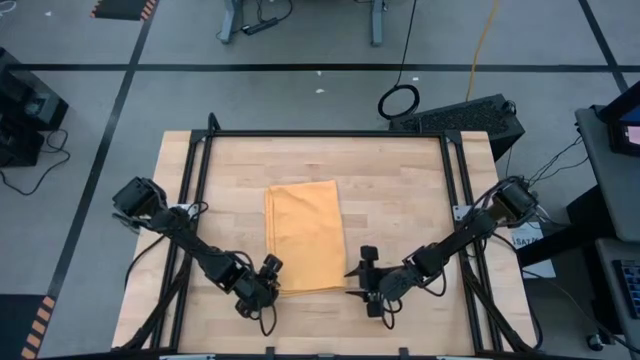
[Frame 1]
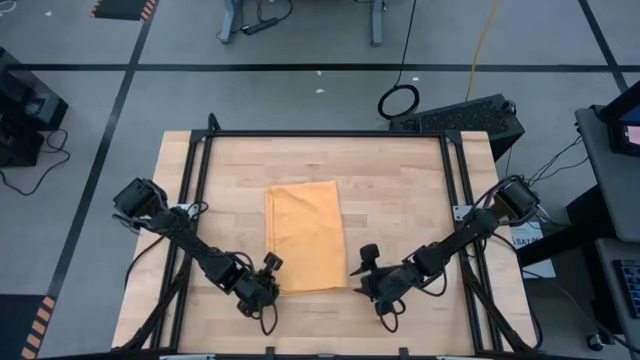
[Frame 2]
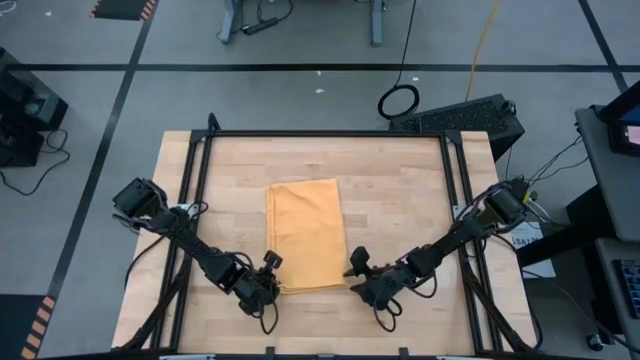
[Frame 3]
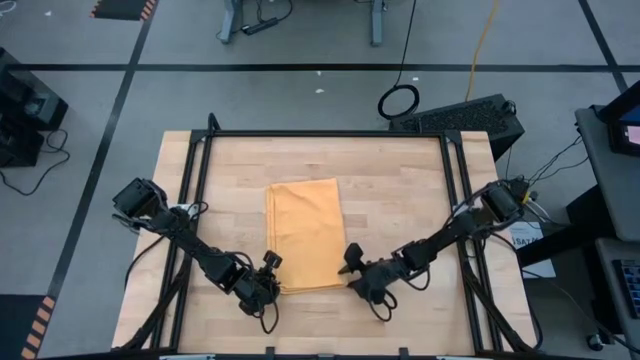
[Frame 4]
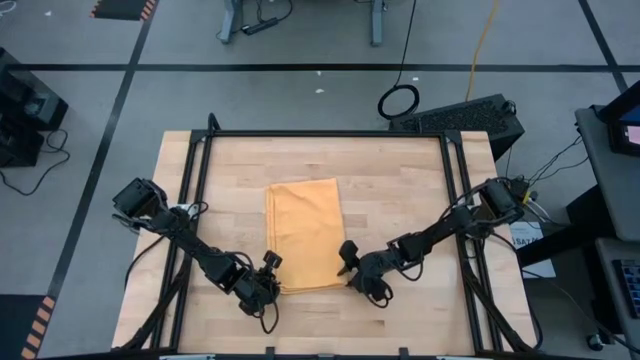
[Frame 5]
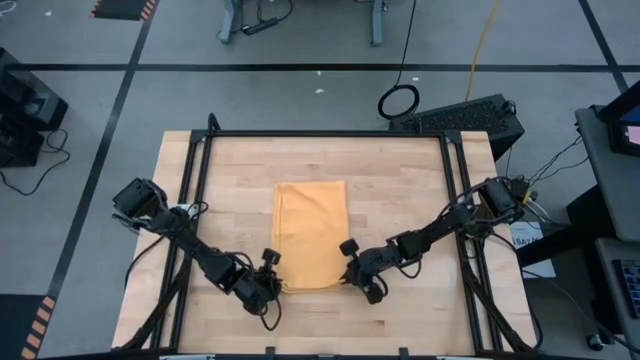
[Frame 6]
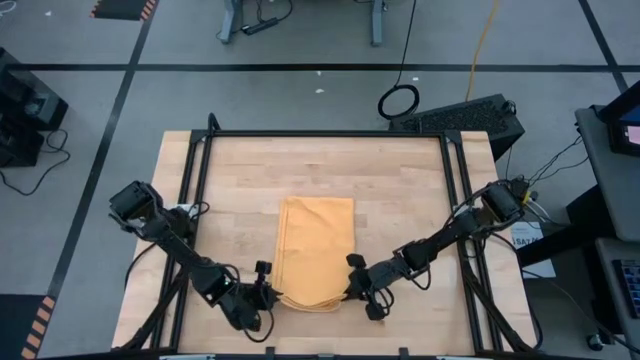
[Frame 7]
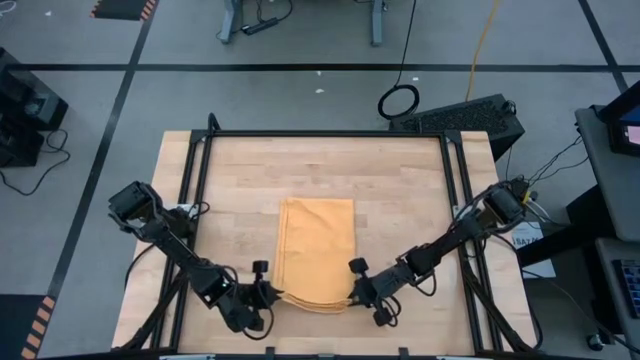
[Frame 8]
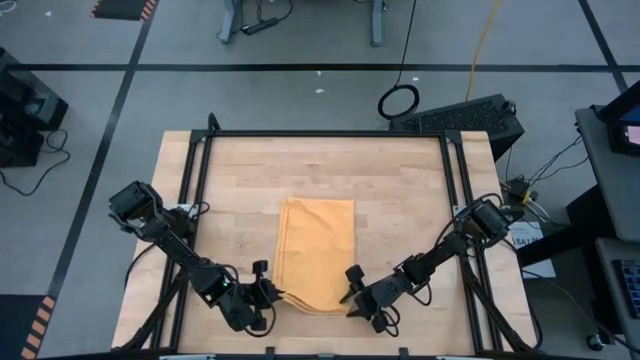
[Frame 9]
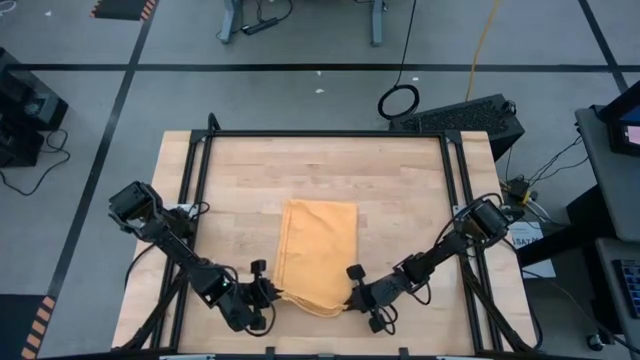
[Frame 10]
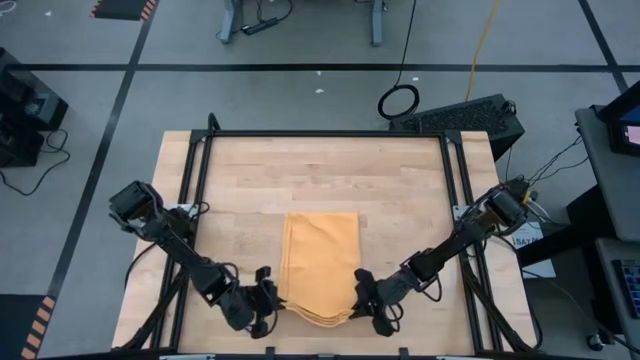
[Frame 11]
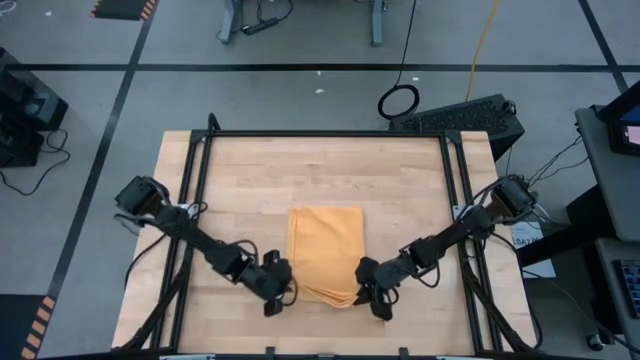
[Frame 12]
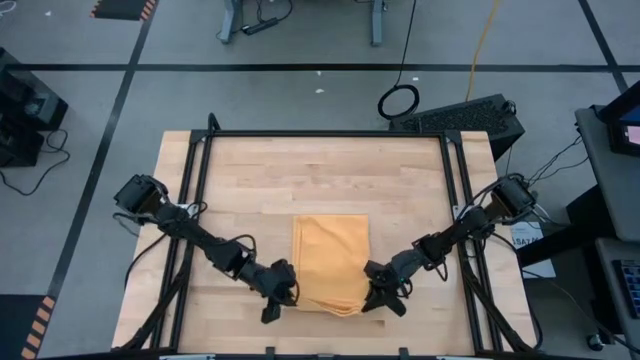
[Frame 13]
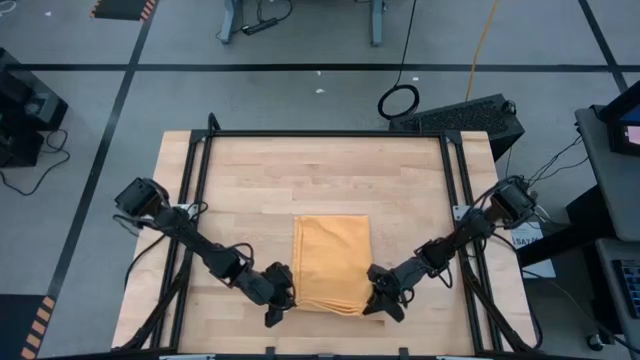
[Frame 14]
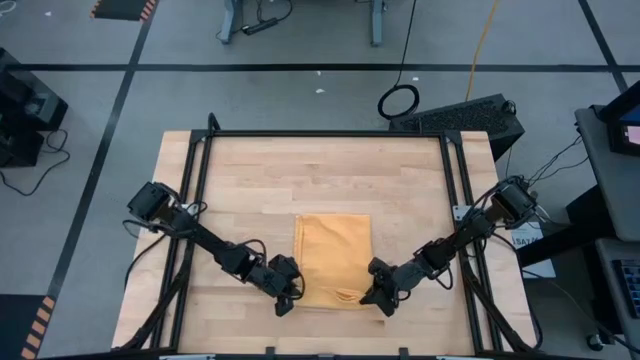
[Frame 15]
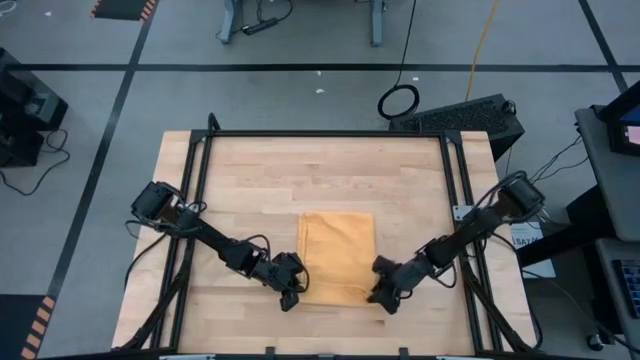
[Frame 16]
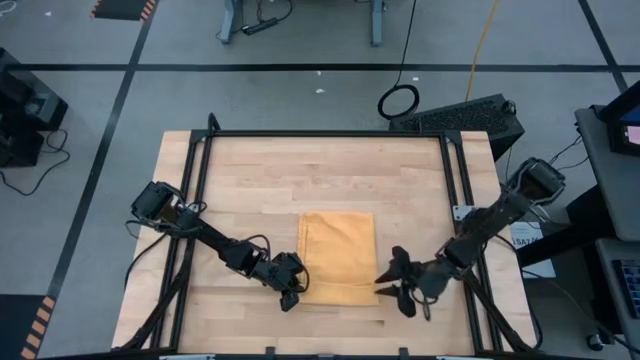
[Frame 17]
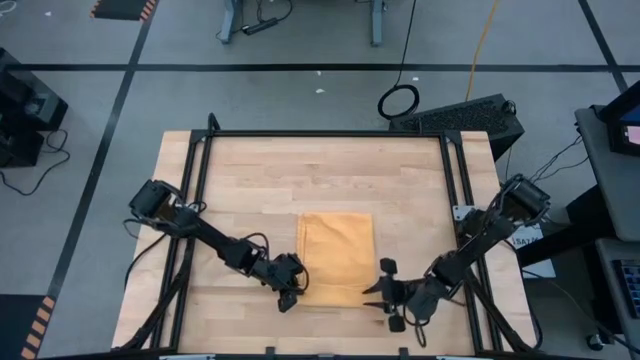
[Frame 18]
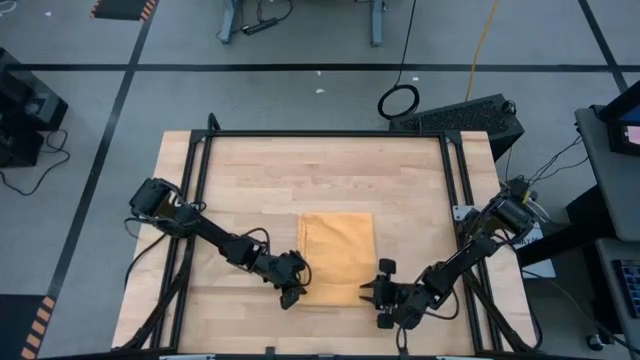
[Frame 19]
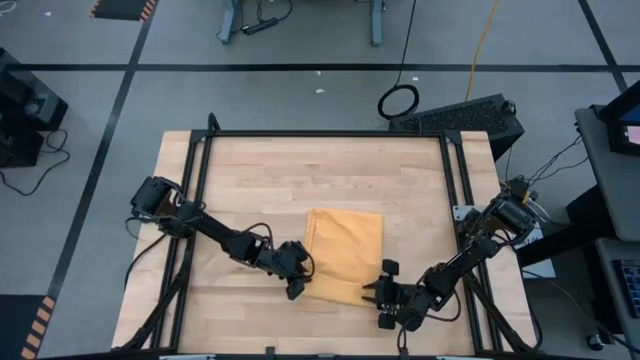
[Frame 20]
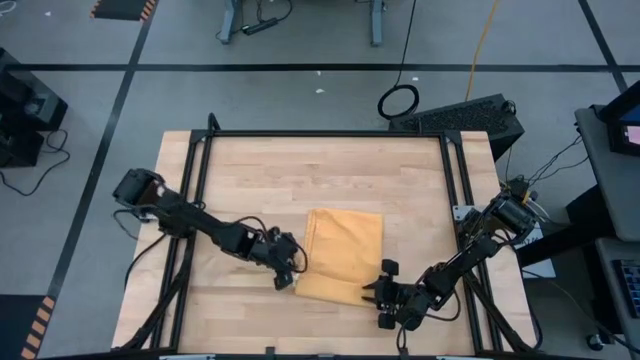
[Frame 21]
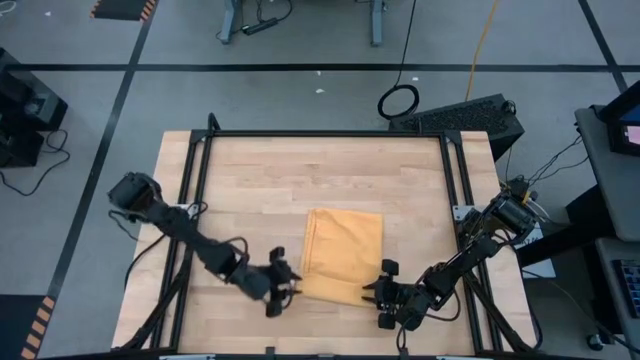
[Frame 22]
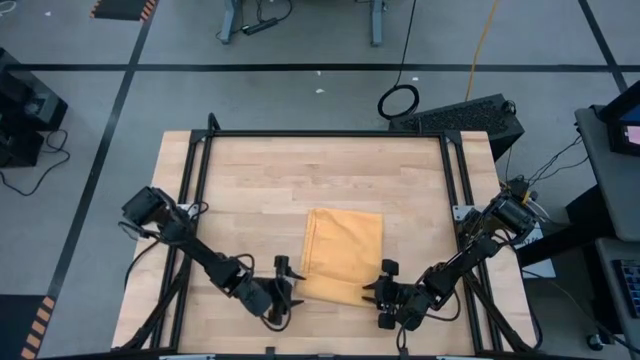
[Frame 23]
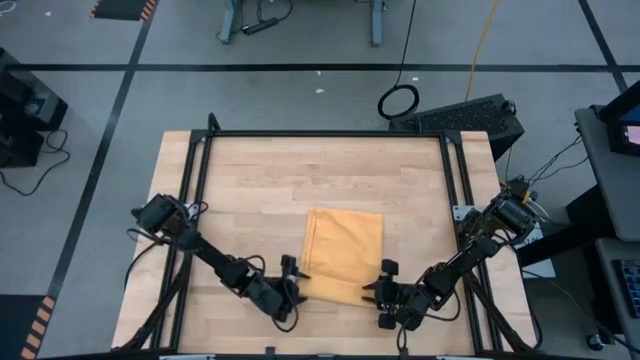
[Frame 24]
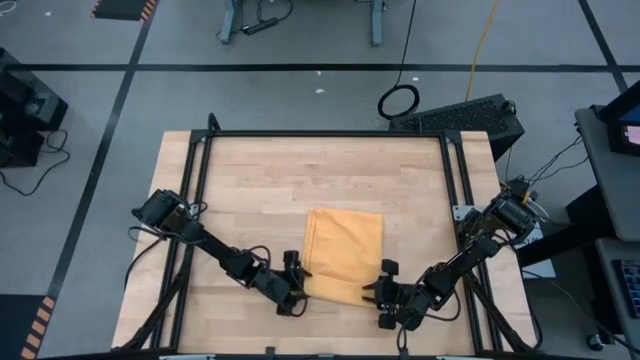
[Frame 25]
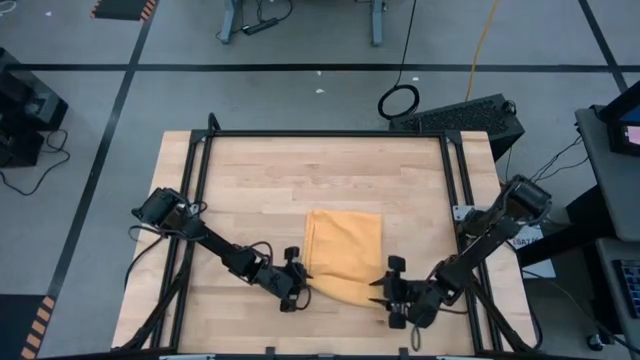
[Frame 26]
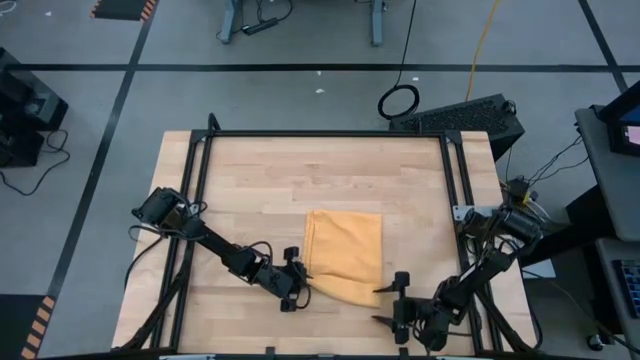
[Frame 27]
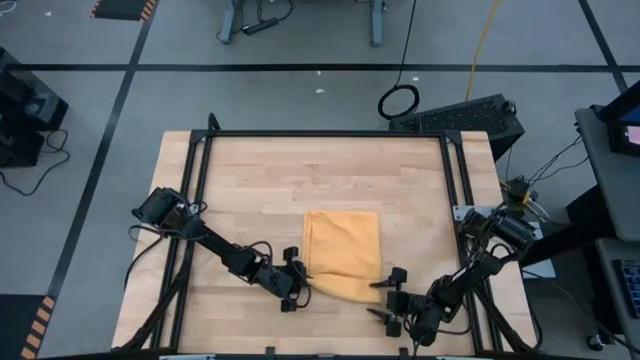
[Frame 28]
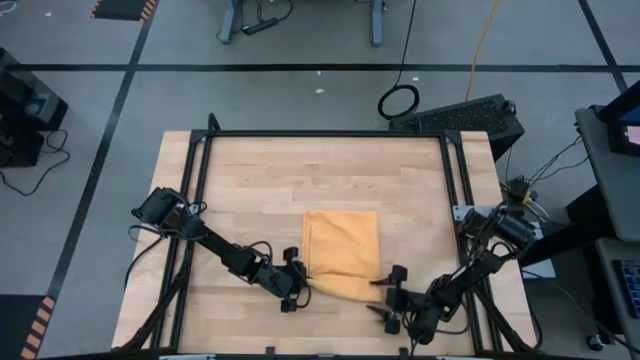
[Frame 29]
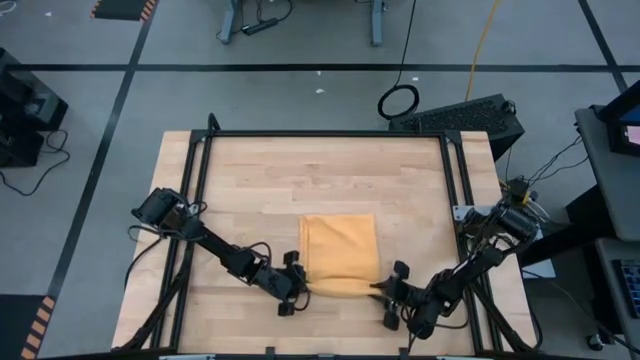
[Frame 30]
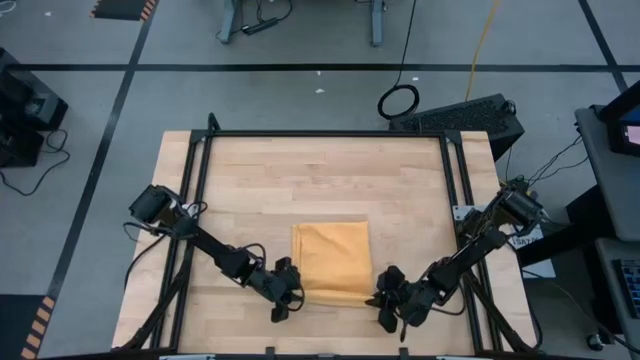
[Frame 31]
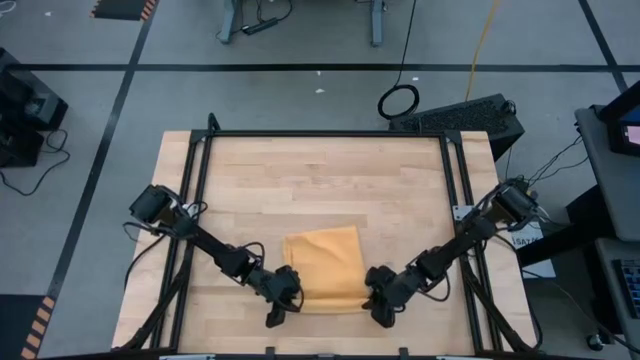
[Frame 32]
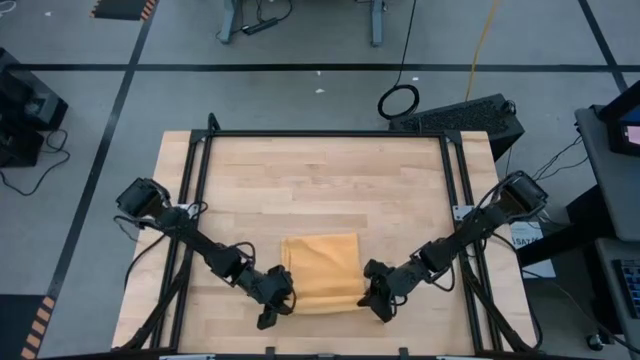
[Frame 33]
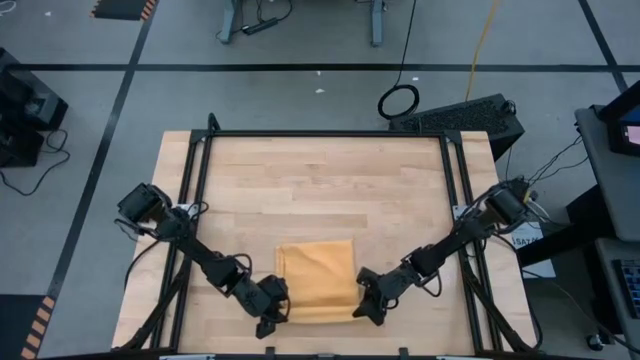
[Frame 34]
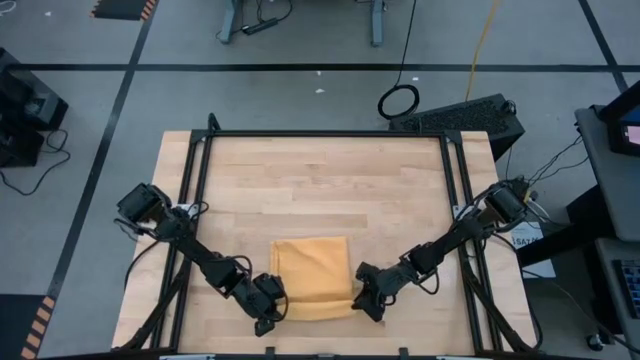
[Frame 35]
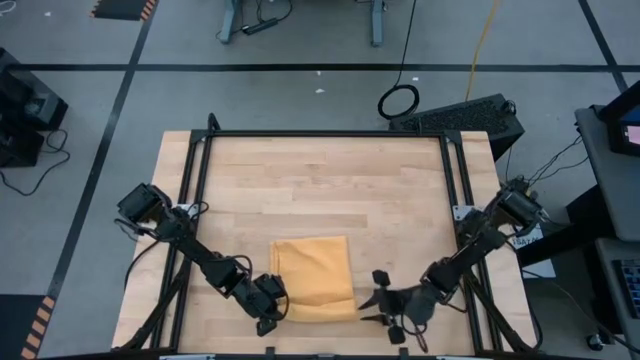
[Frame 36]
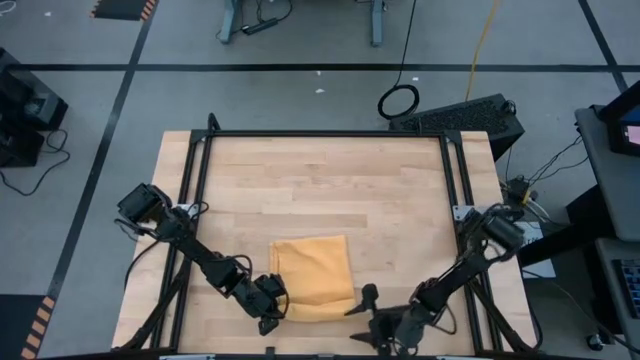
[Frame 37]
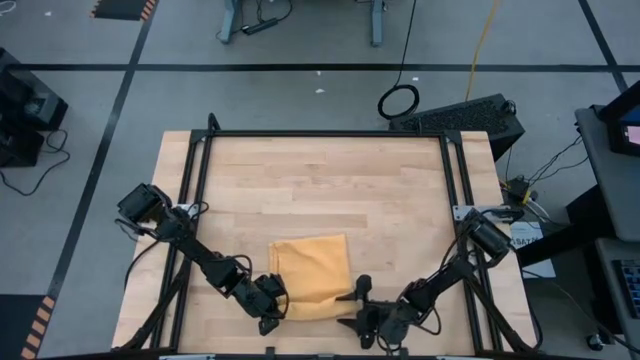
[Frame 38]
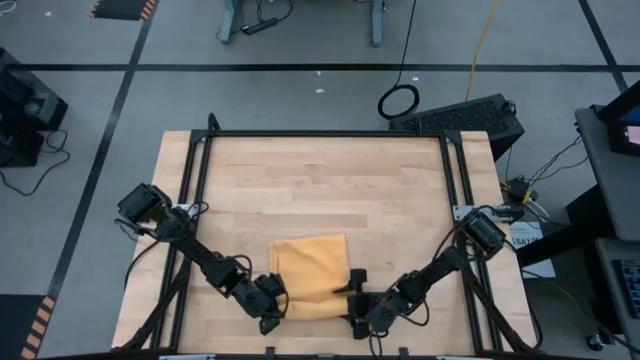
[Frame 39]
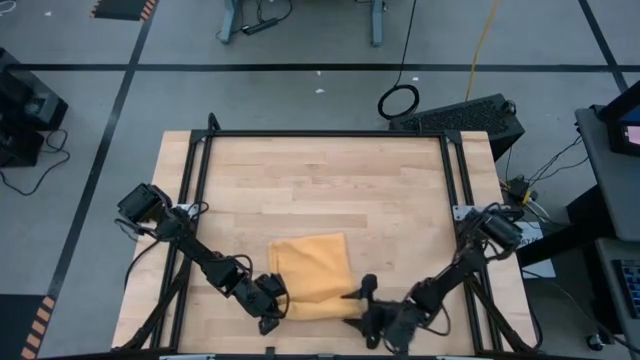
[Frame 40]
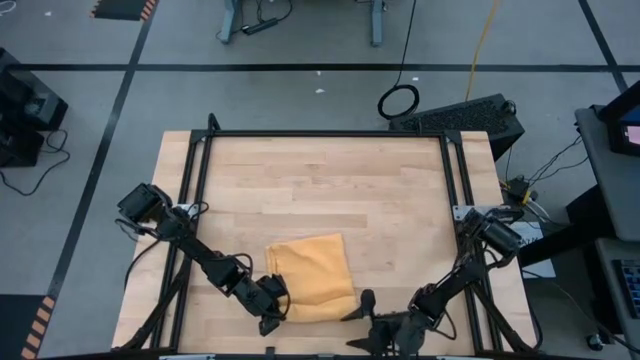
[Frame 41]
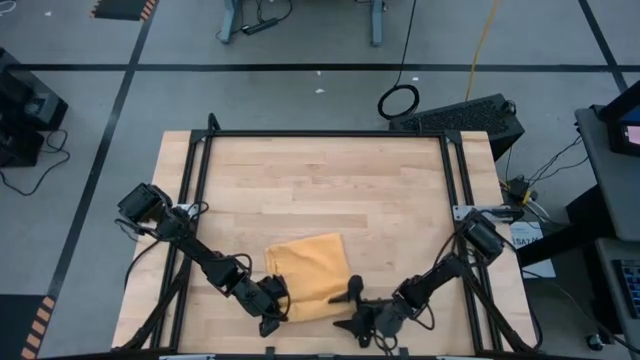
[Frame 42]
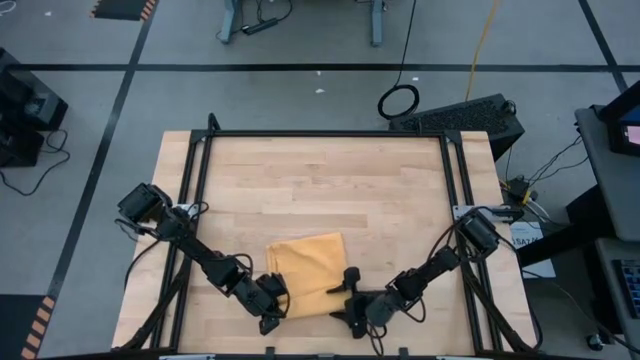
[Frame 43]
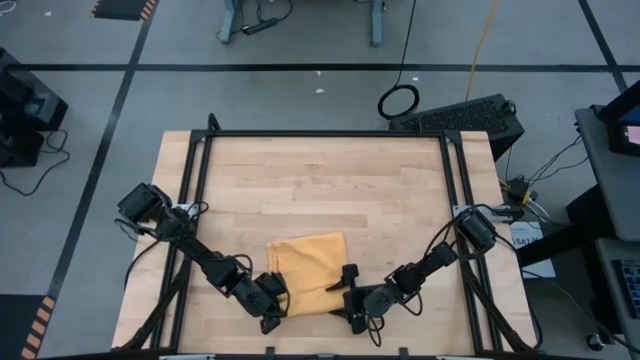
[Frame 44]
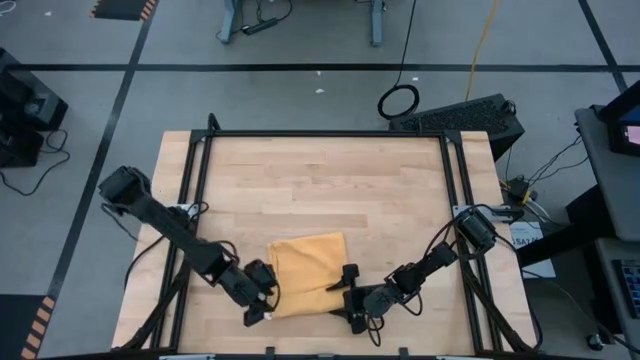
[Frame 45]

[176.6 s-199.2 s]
Task: Roll towel
Roll the folded yellow towel
